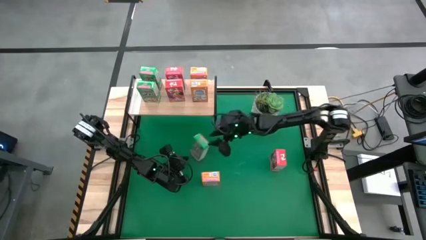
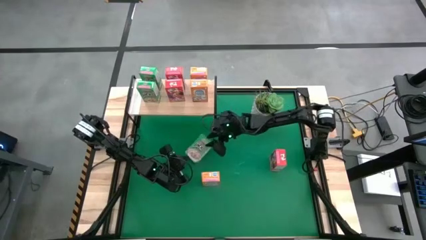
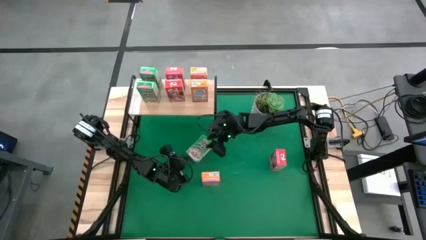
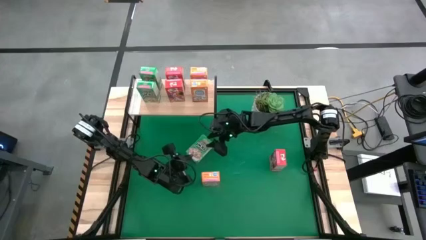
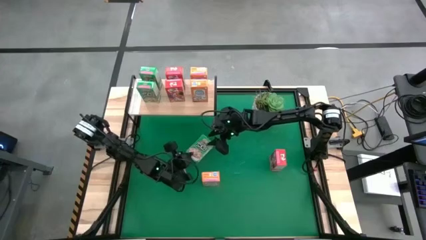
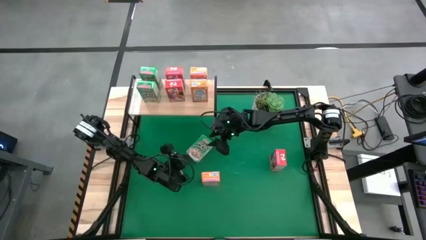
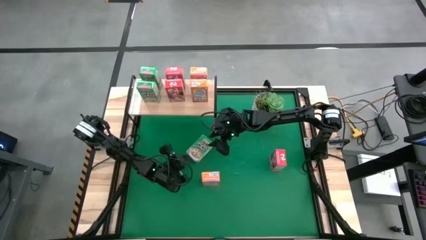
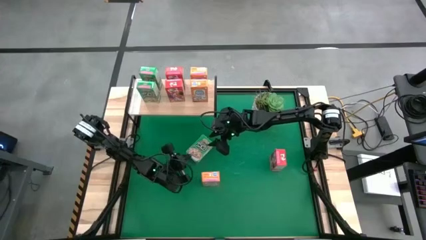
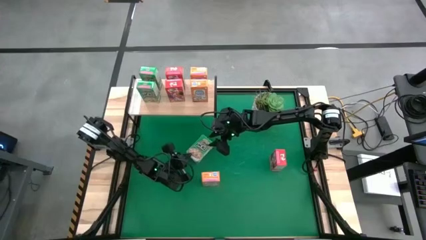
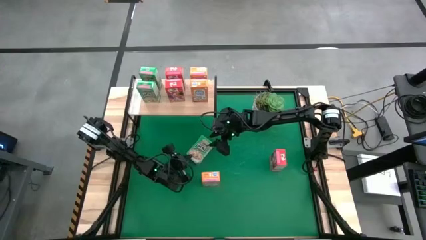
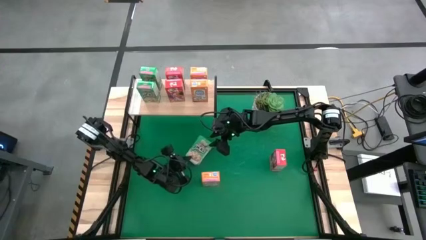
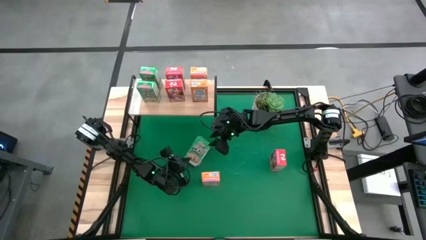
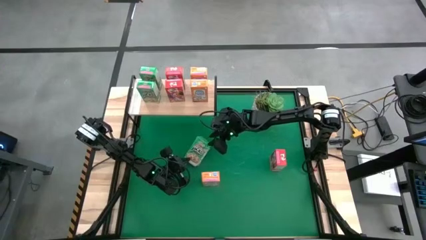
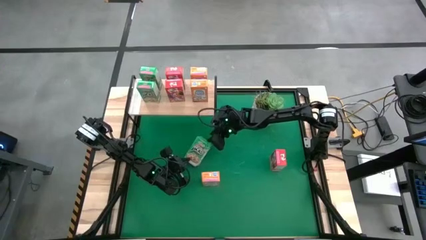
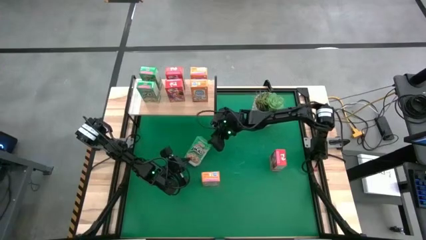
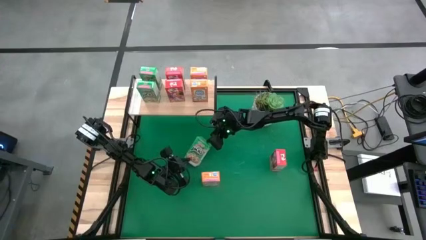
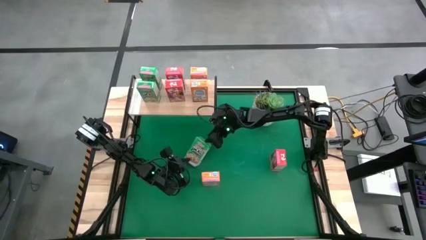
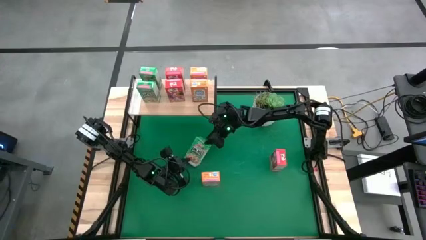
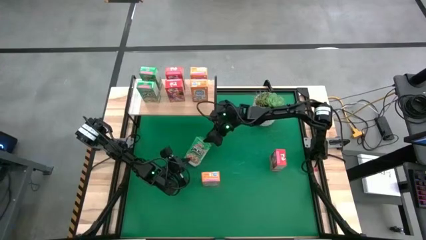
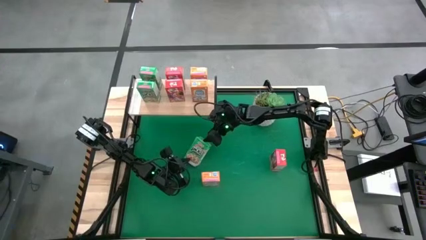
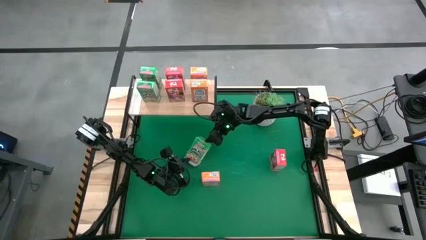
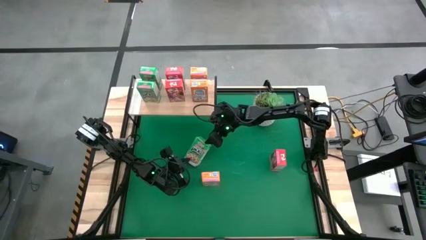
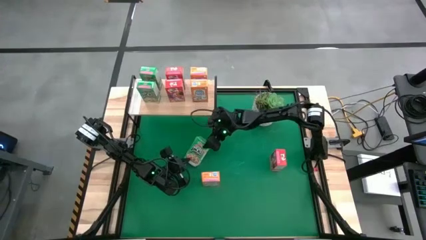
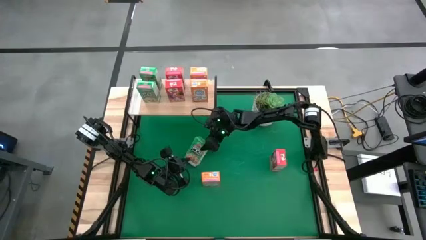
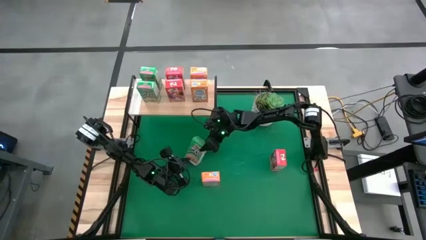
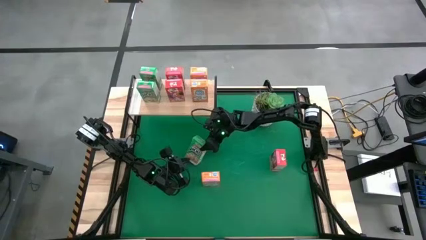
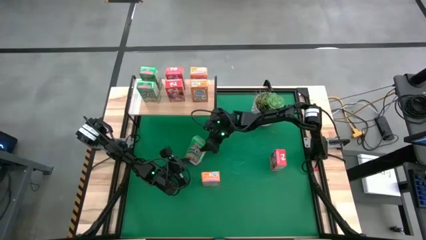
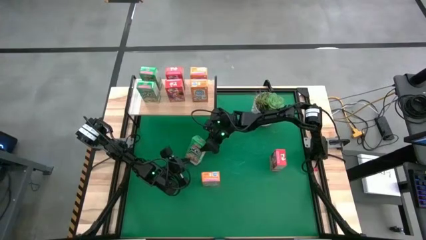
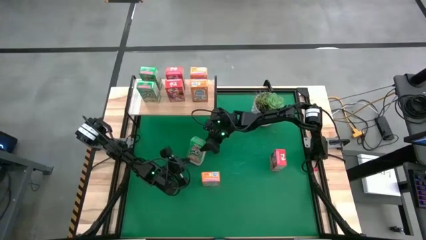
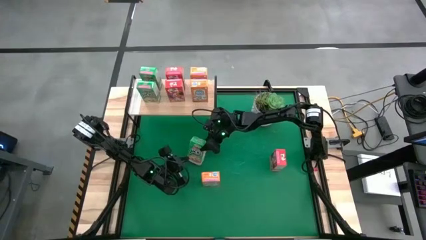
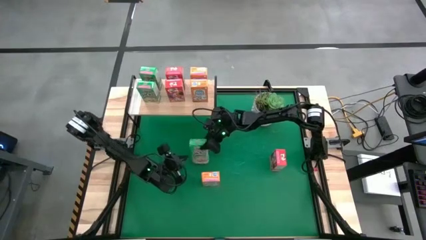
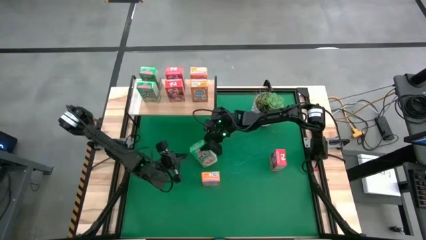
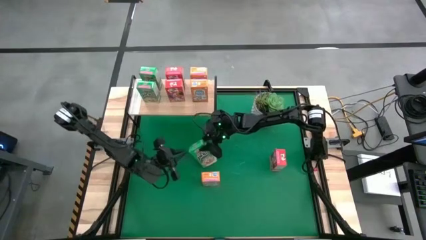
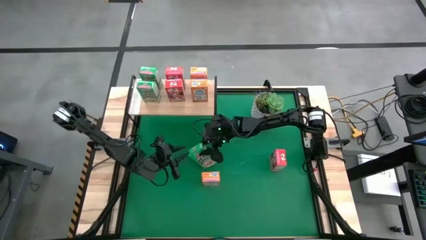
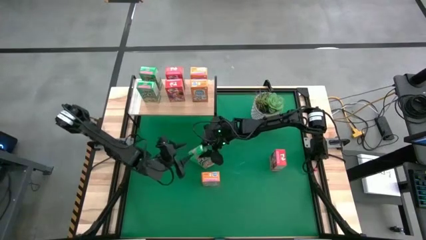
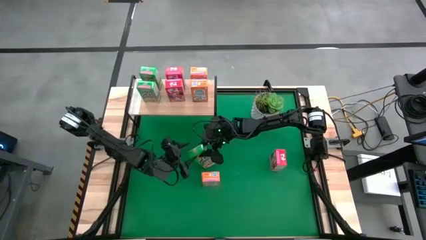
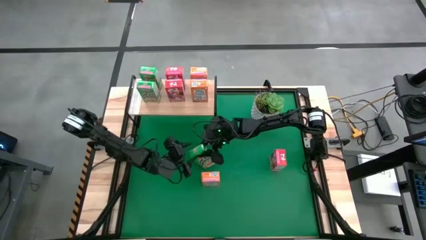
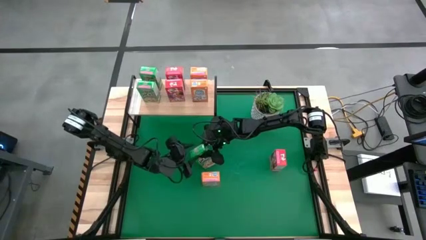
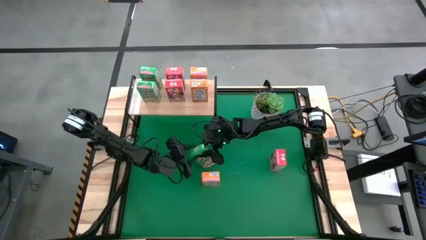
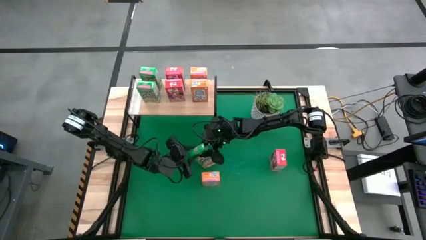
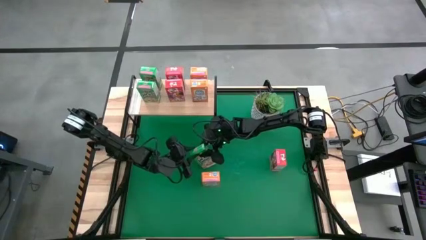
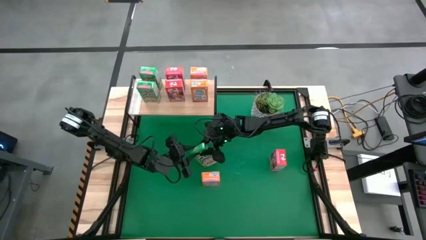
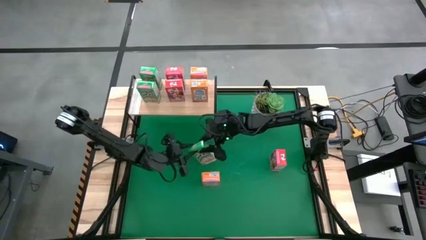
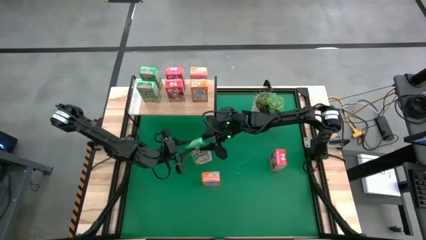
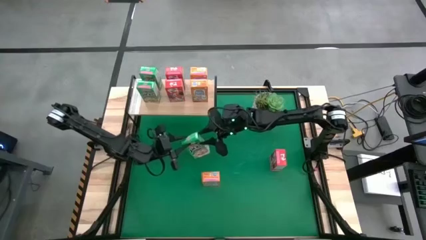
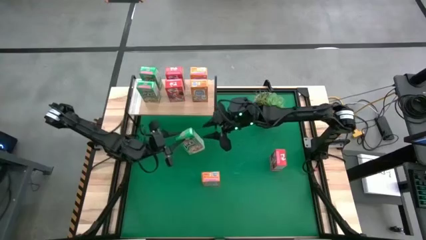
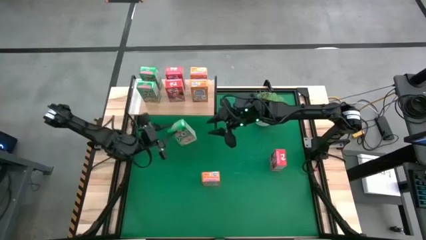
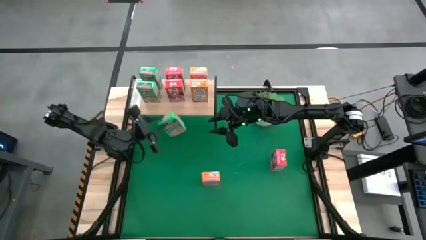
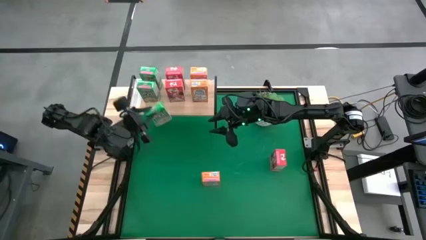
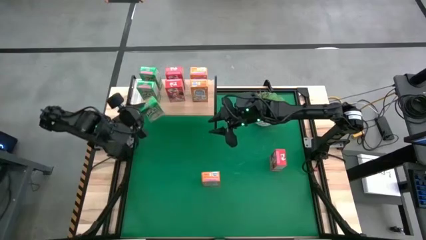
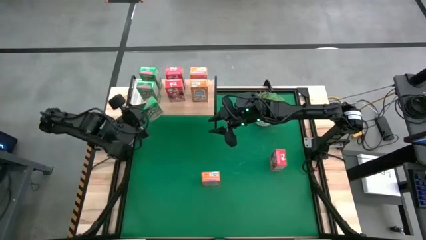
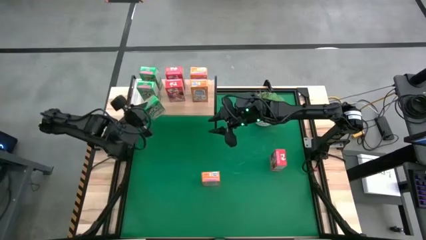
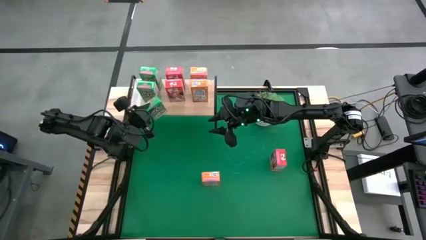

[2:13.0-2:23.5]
Task: Stack cereal on shelf
Put the green cereal box on the shelf aligned with other green cereal boxes

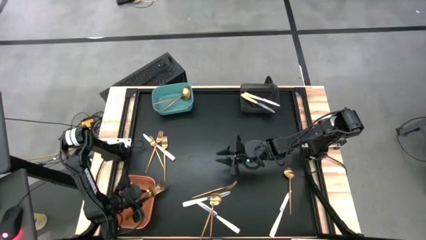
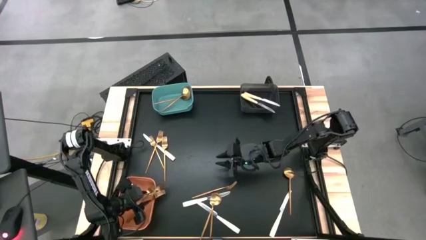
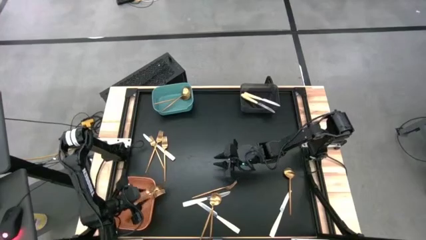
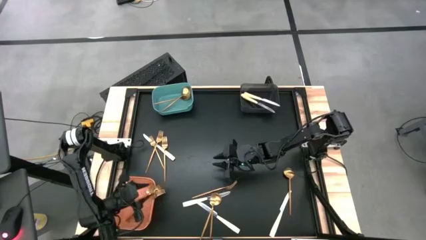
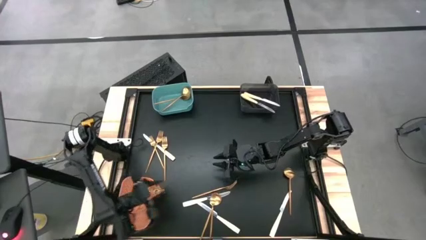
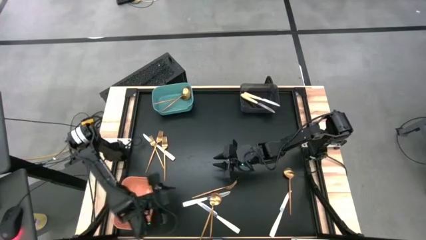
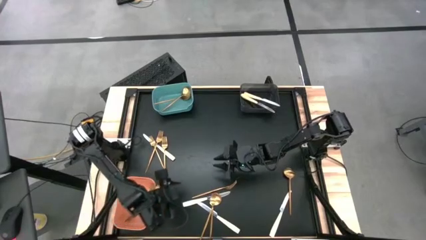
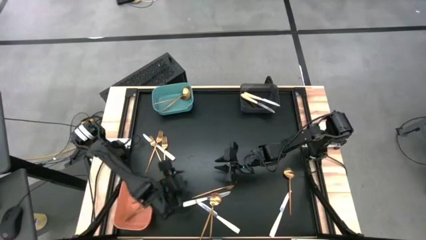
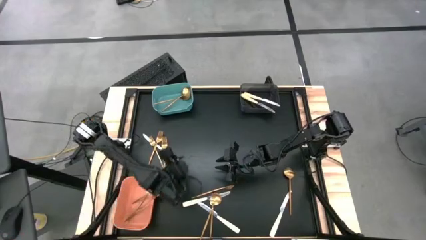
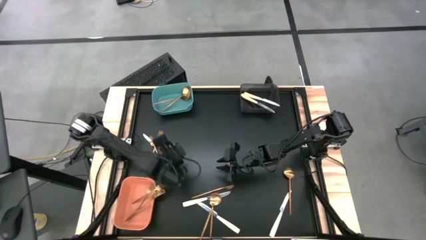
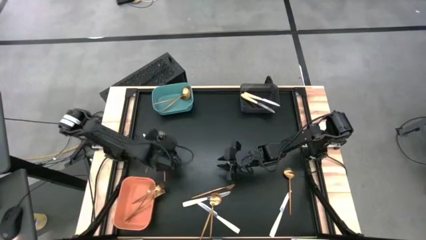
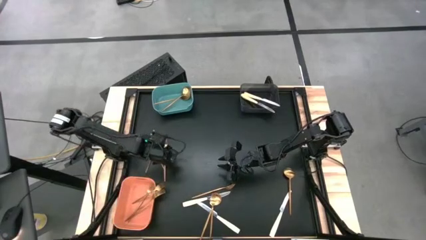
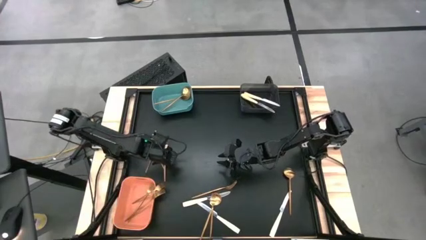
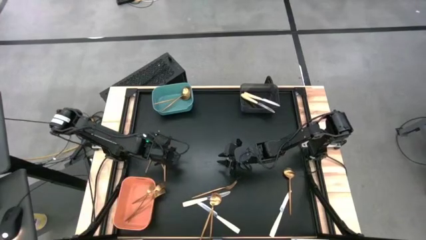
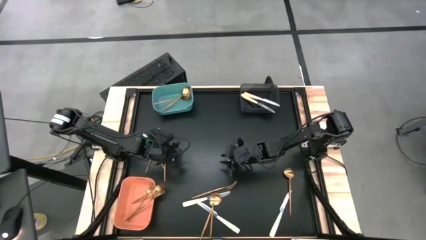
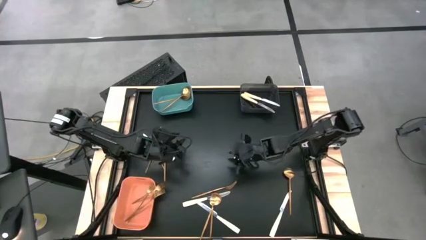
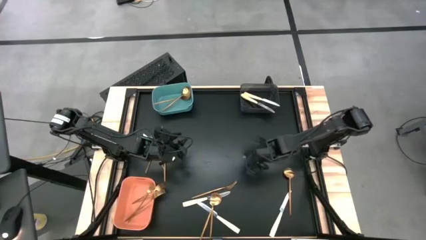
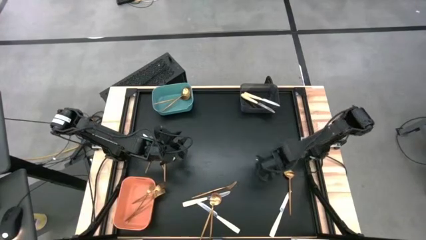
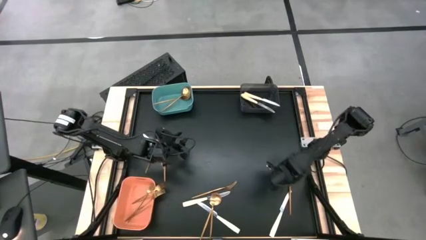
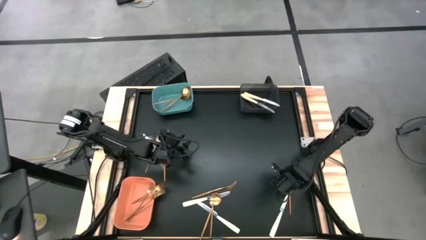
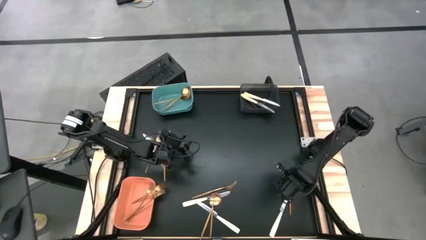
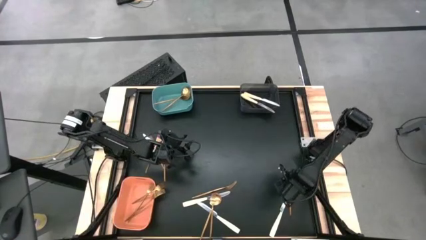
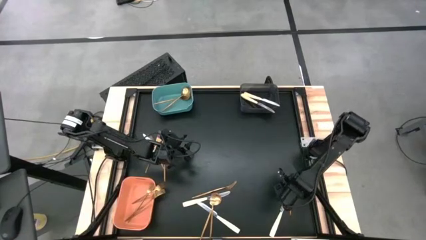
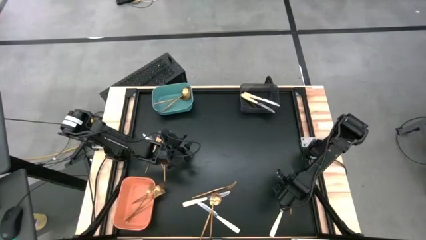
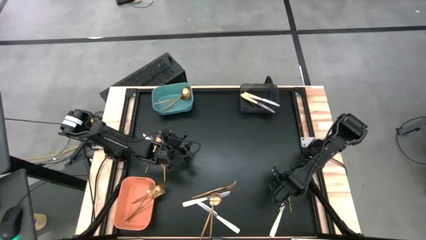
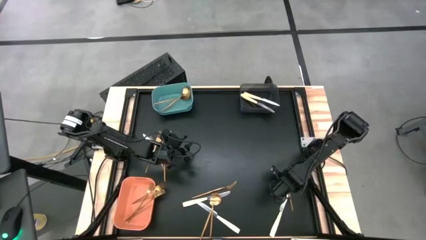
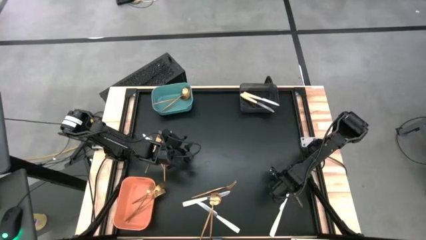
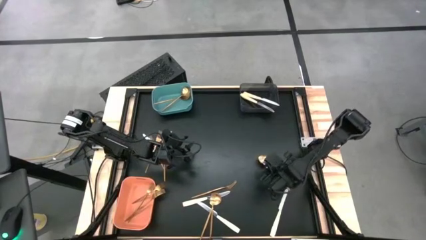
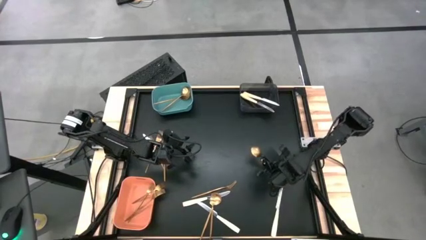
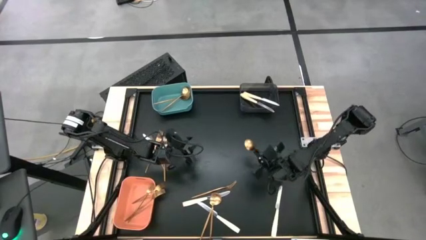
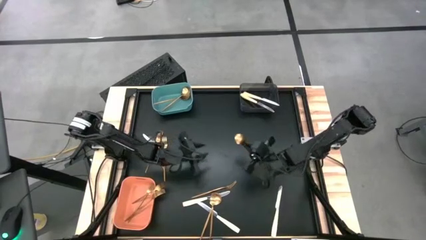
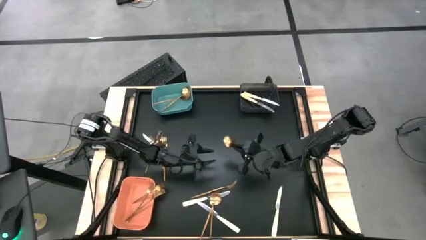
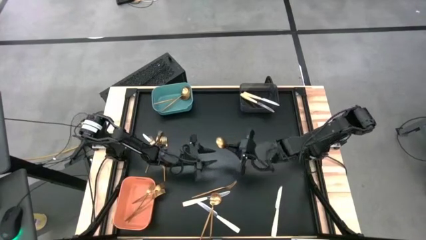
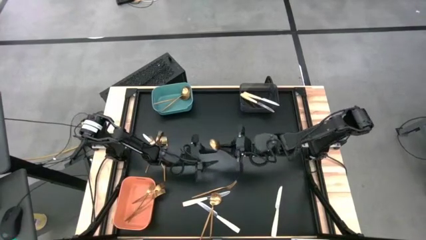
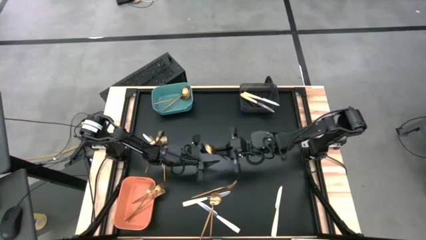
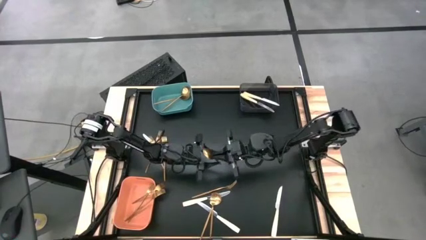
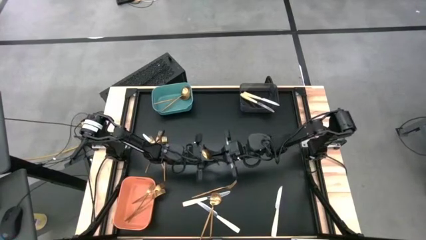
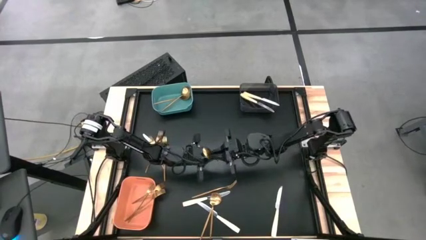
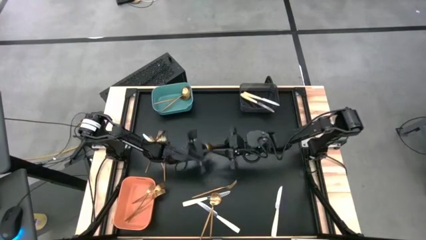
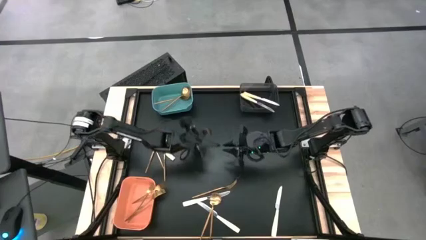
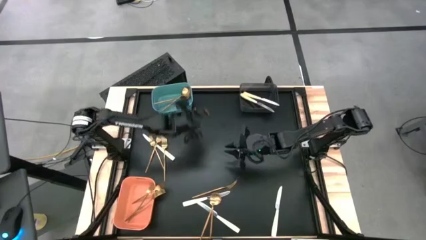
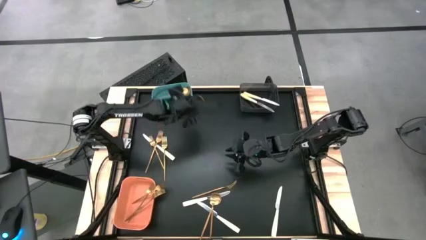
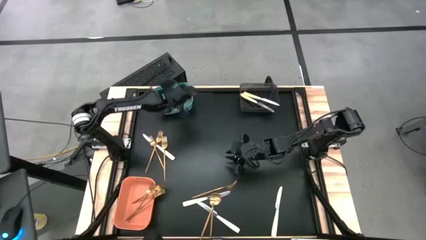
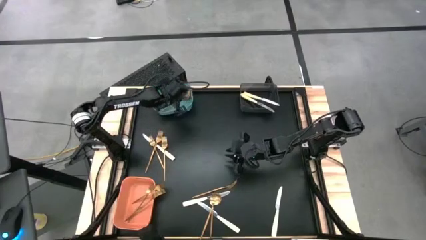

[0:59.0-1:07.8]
Task: Sort silverware by color (type)
Put the gold spoon into the green bin
